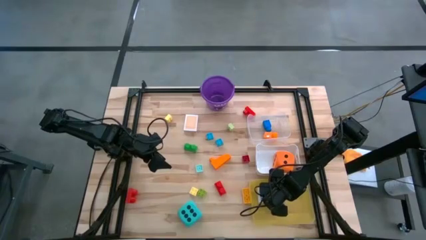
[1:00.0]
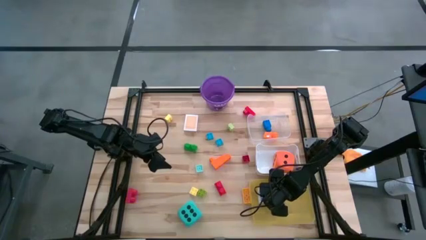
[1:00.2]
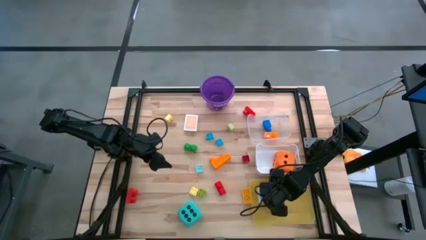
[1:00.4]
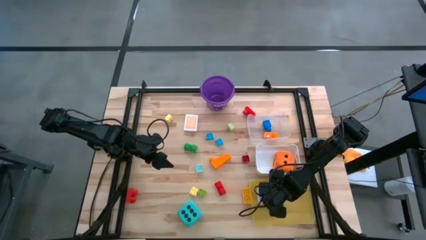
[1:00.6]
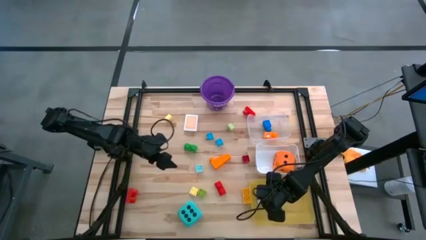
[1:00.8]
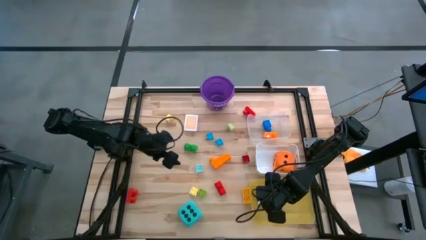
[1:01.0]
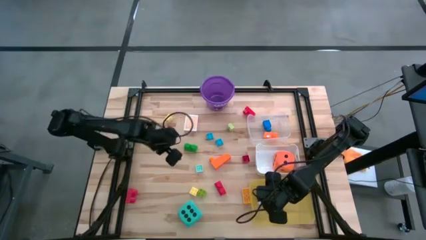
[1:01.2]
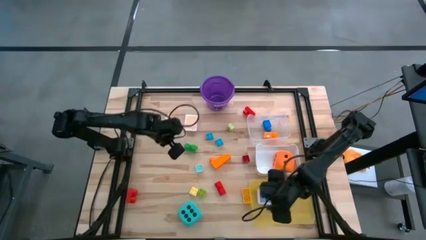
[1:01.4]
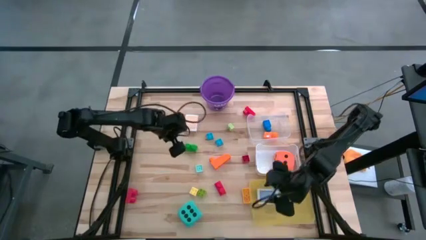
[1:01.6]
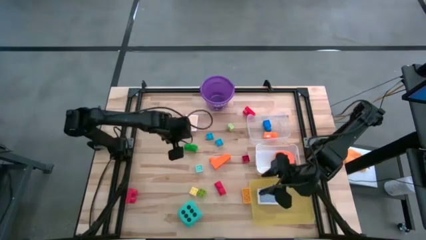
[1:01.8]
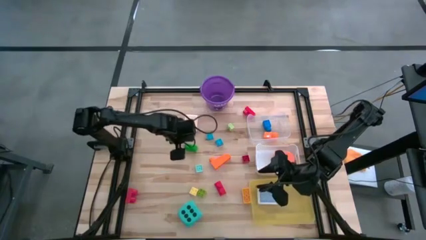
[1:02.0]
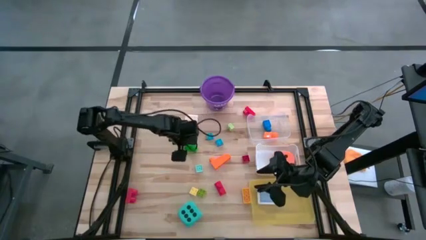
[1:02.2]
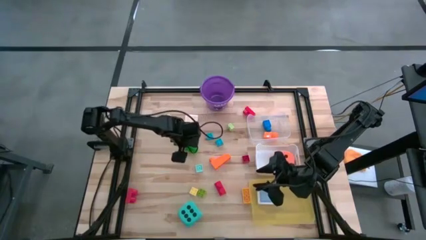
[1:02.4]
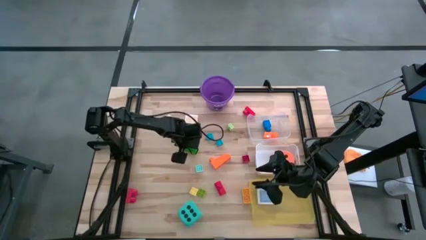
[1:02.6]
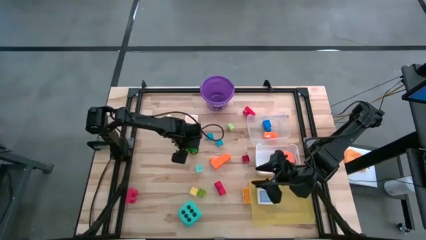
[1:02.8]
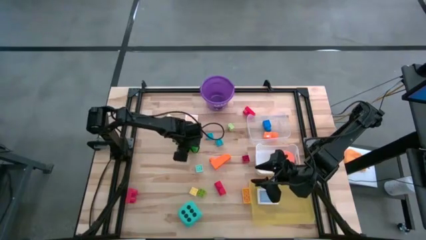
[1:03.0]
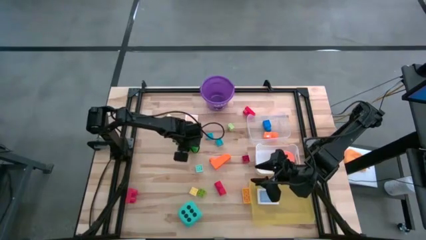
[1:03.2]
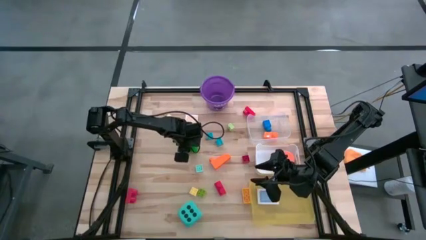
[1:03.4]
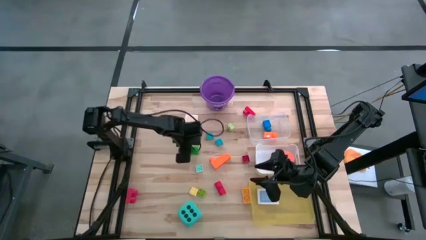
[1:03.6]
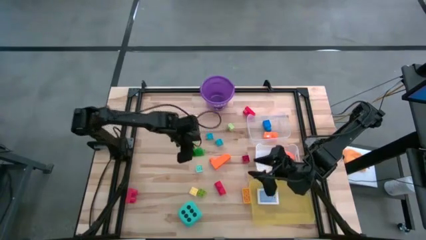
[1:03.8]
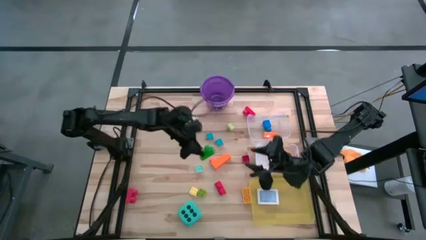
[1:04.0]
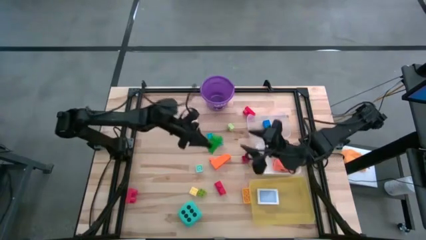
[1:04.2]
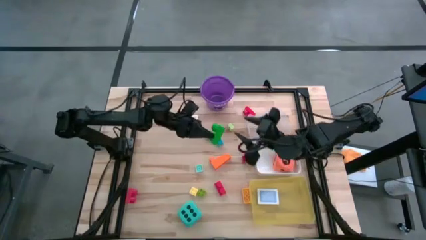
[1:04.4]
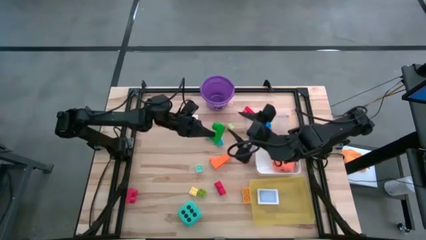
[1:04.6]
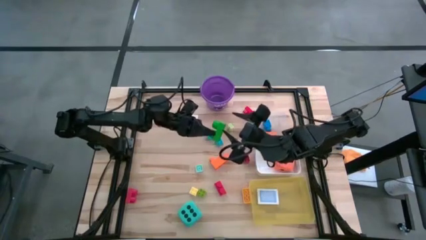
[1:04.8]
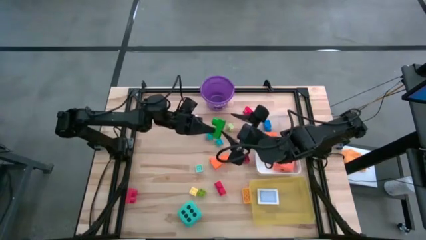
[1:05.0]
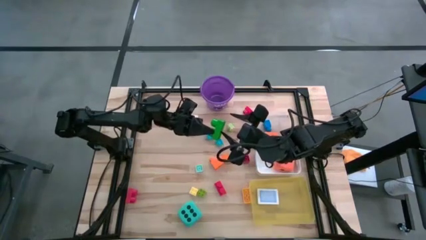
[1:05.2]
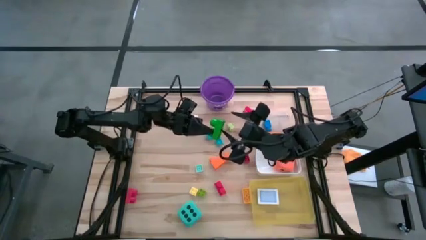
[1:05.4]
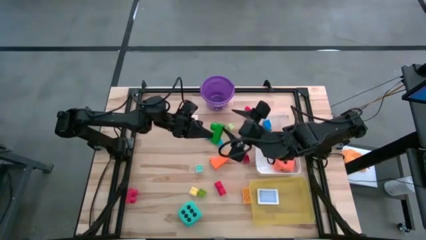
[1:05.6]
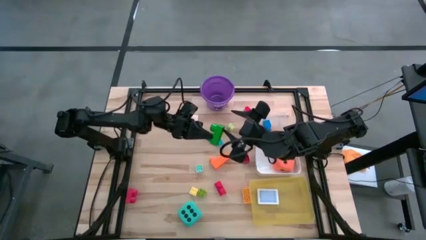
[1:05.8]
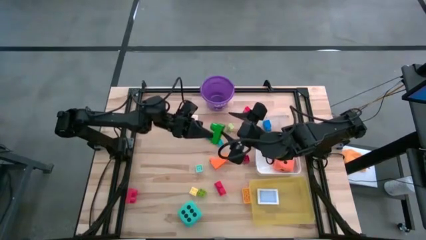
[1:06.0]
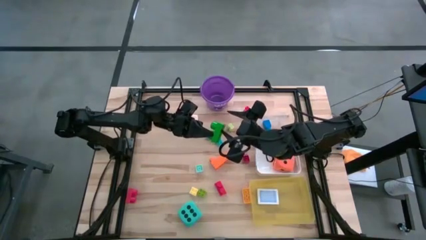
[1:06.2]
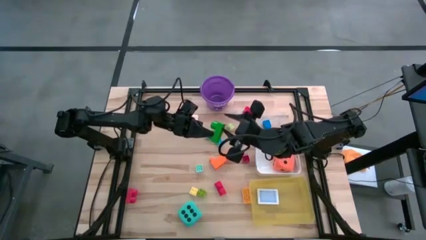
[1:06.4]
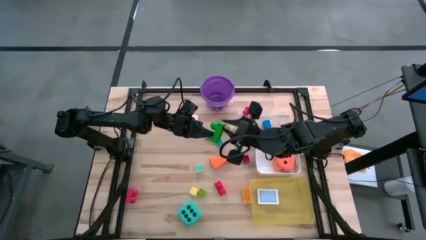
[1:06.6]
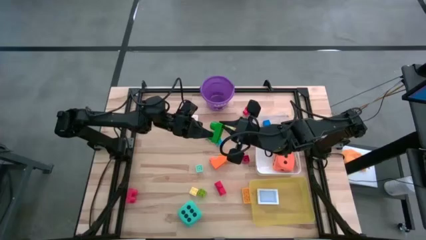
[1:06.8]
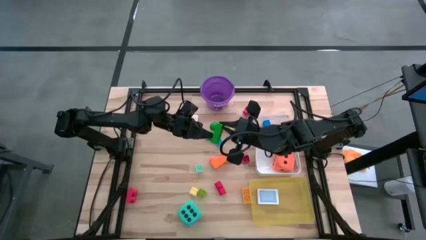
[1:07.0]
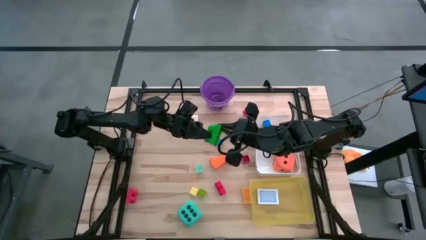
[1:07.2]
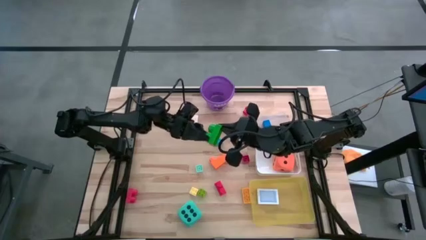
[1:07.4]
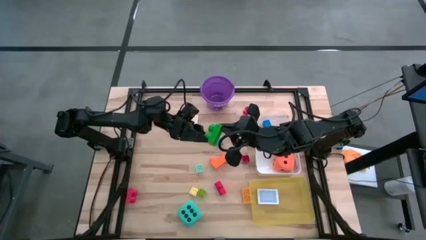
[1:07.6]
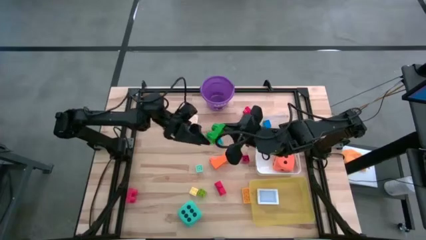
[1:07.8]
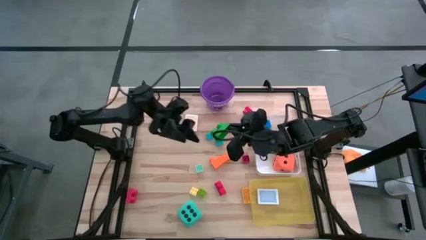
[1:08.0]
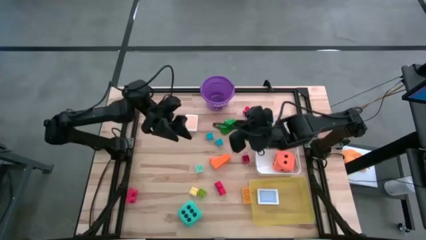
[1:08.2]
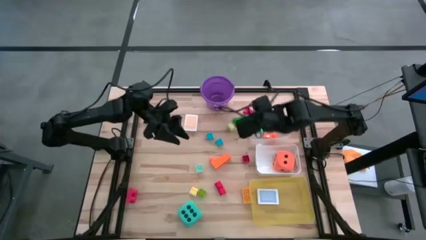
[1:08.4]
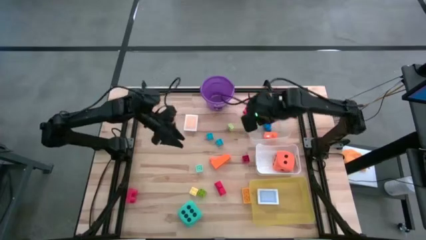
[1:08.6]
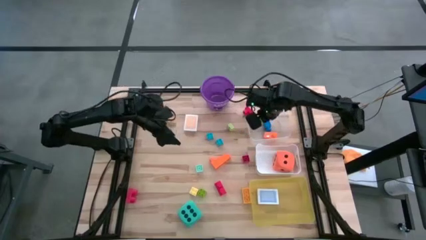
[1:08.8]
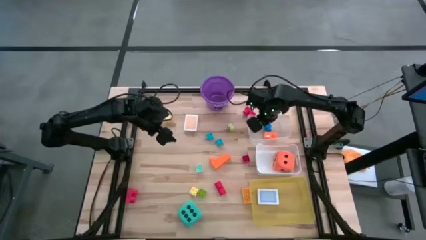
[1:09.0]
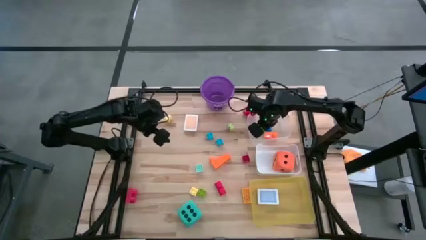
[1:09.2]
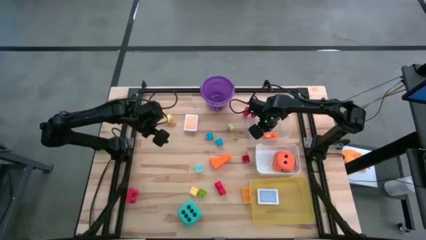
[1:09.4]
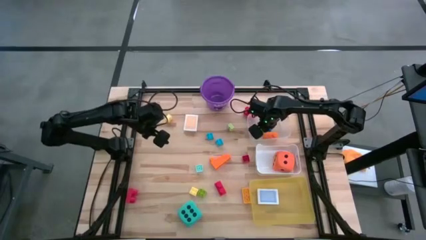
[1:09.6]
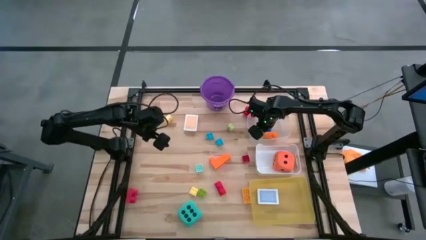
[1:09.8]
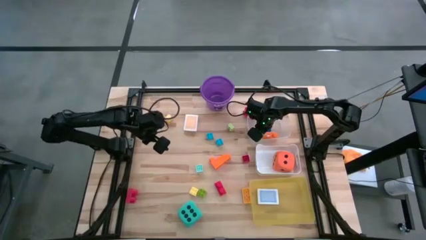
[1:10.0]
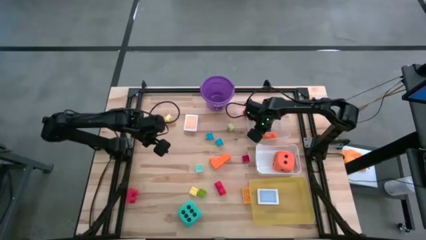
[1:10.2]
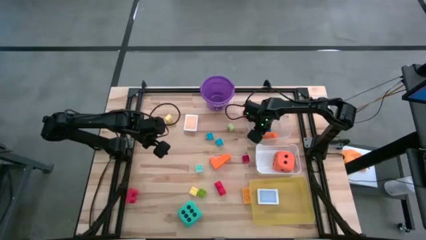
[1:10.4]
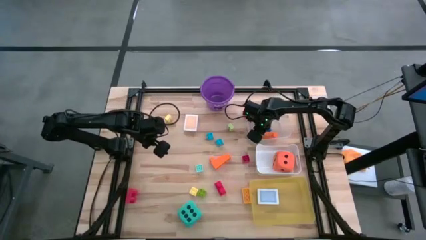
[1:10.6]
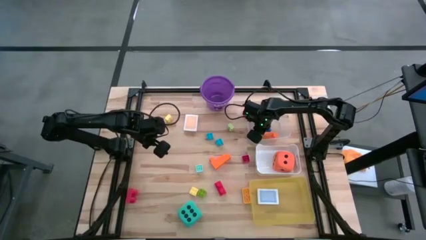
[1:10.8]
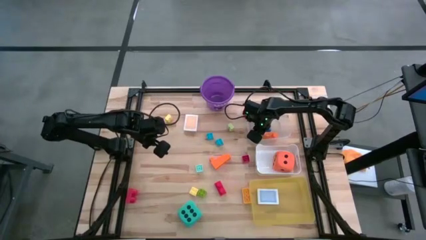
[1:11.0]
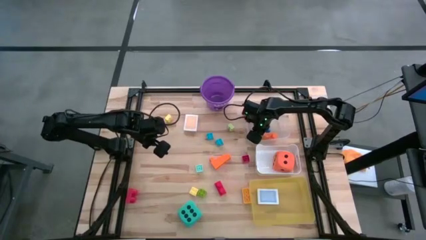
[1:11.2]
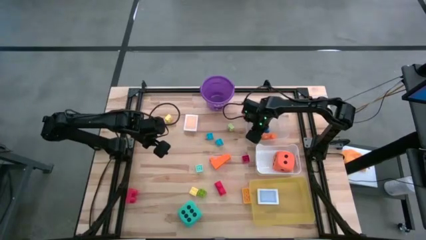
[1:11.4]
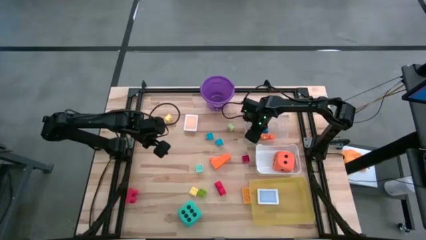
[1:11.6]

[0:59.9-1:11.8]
Task: Pick & Place Toys
Put the dark green game piece into the transparent bin
